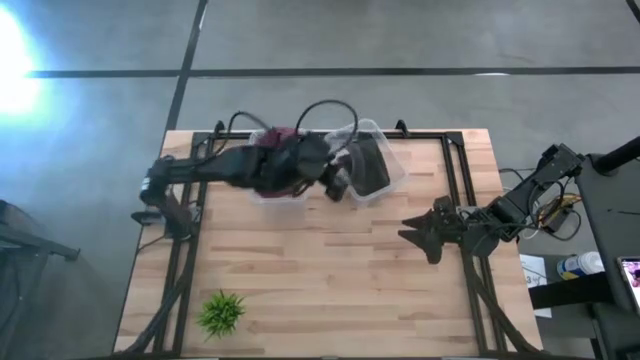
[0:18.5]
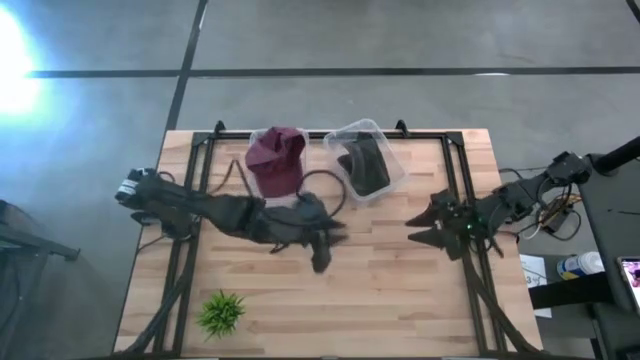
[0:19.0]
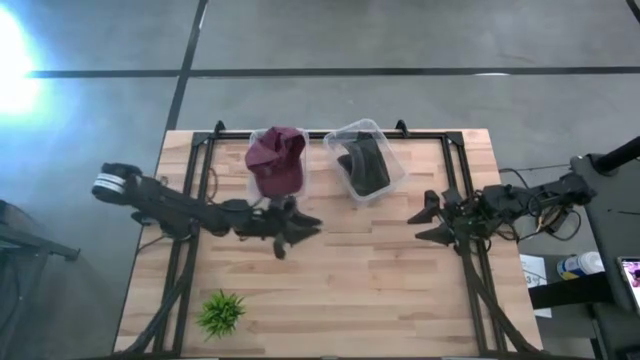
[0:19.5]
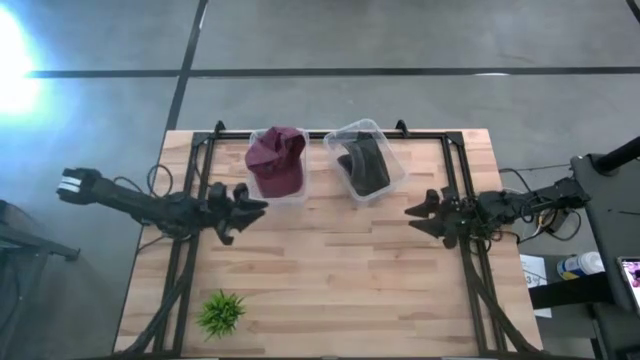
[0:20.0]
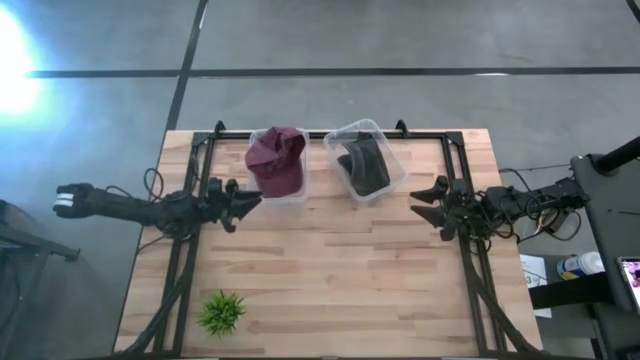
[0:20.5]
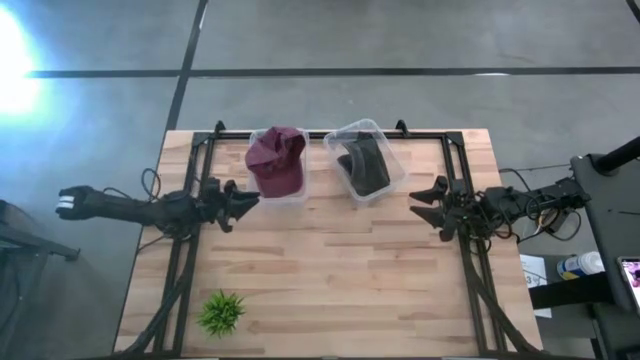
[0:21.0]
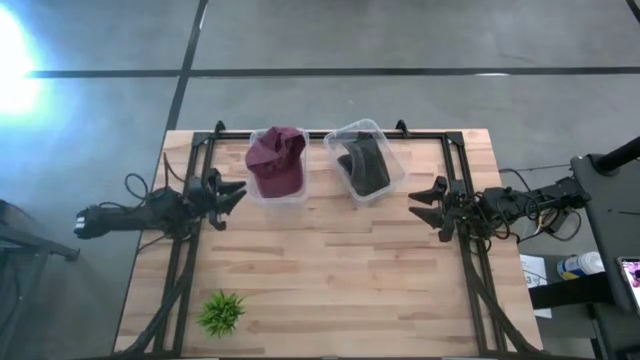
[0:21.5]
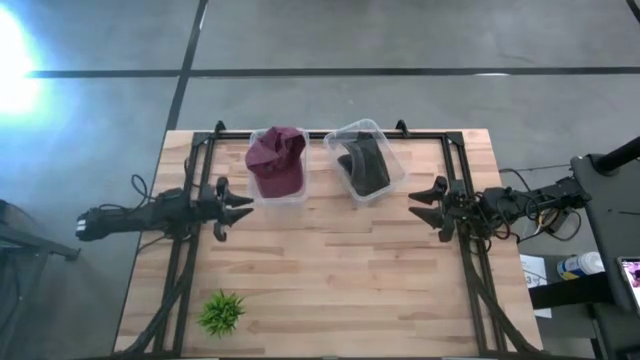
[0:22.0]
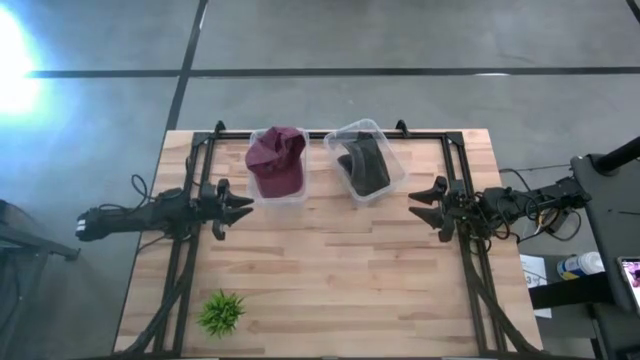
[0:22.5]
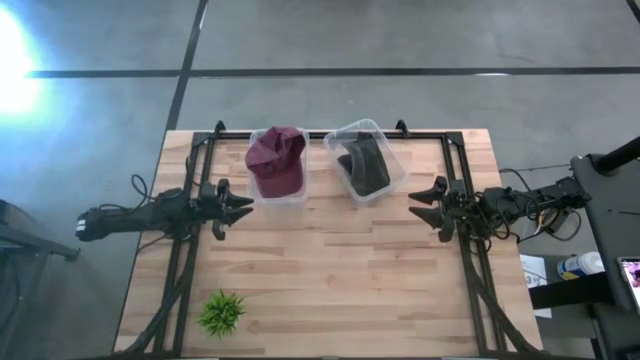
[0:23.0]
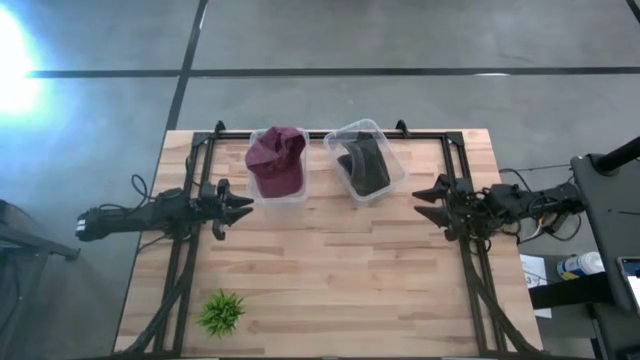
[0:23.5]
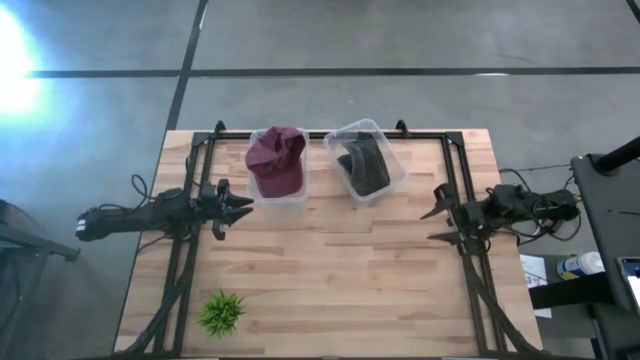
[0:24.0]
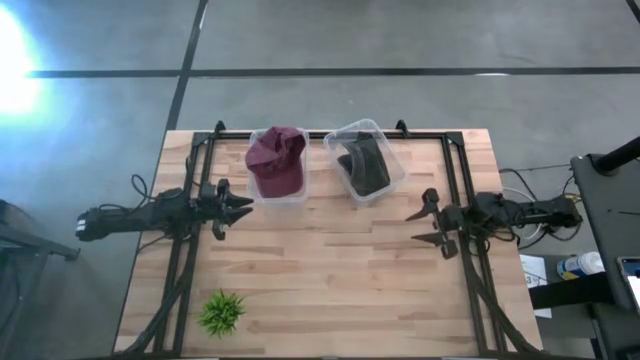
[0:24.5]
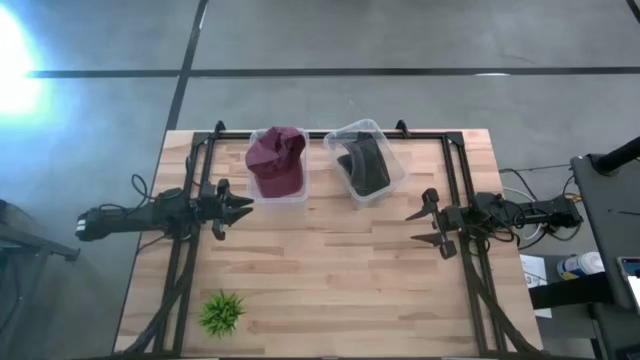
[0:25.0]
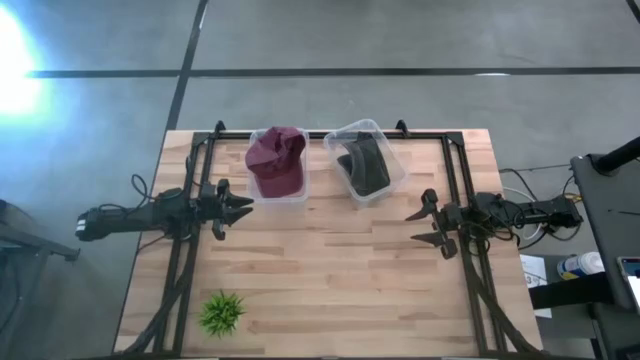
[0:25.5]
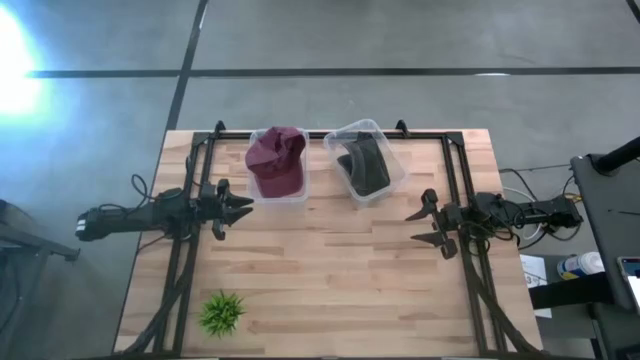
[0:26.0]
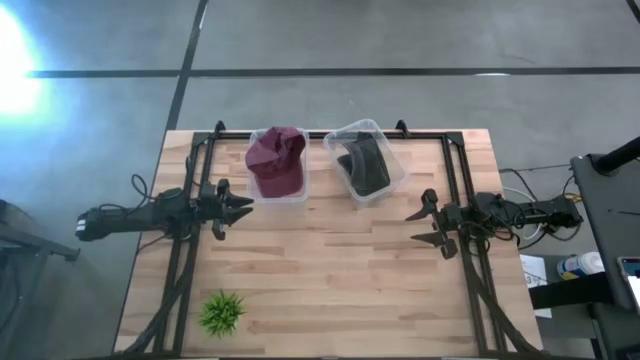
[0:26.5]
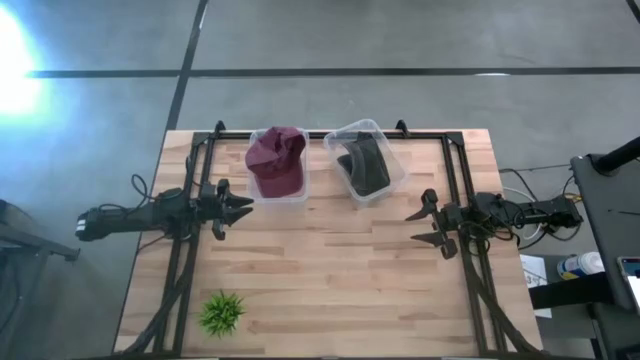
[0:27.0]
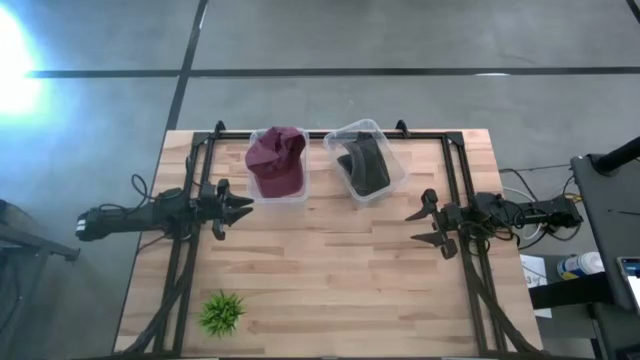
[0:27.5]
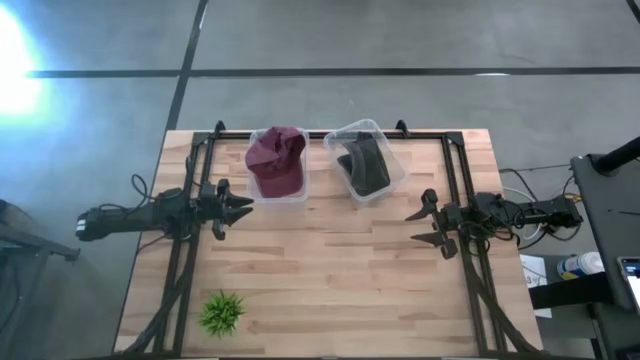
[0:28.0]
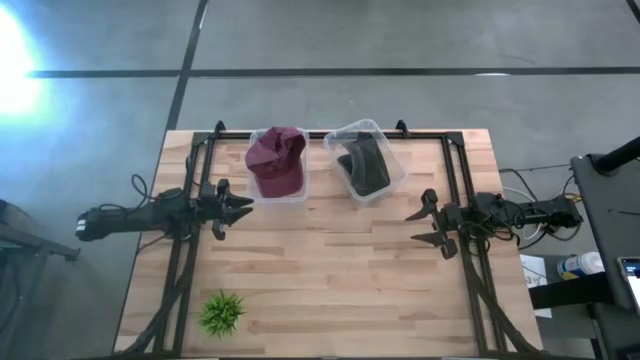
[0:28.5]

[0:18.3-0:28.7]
Task: Pick & Place hat
Return to Home Position

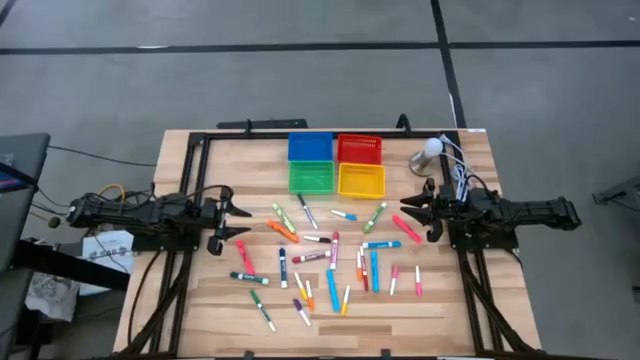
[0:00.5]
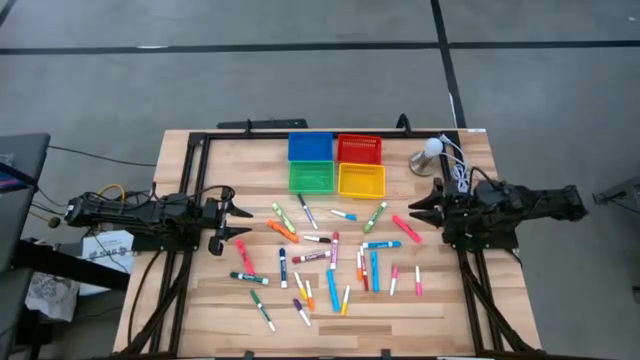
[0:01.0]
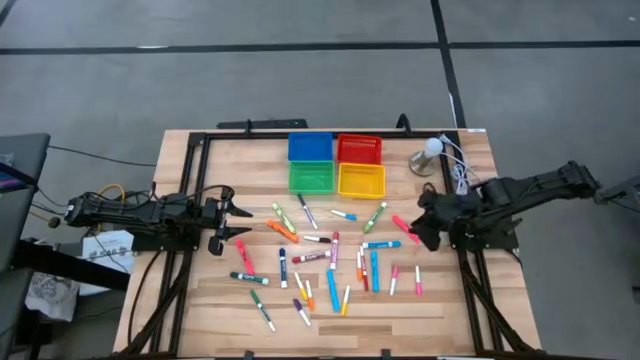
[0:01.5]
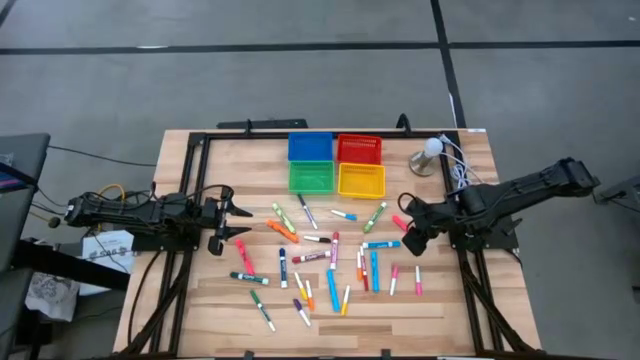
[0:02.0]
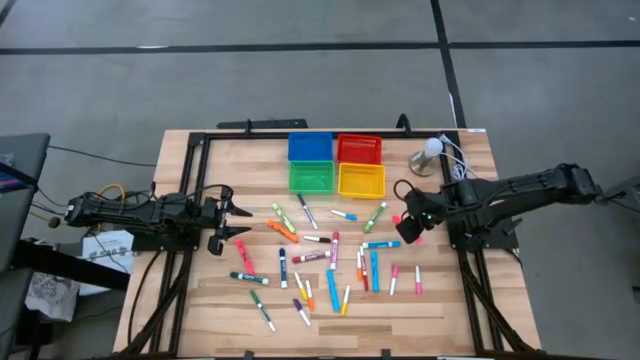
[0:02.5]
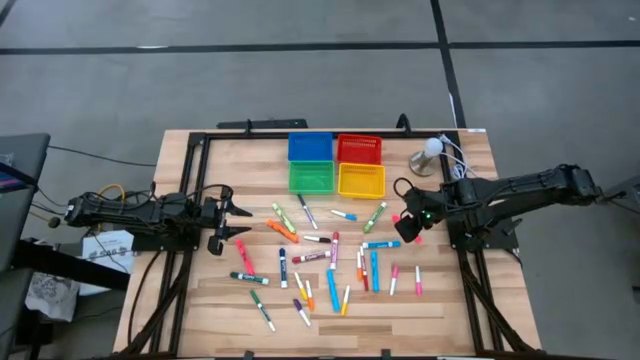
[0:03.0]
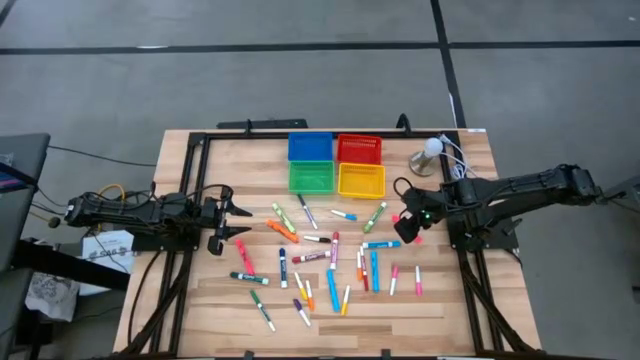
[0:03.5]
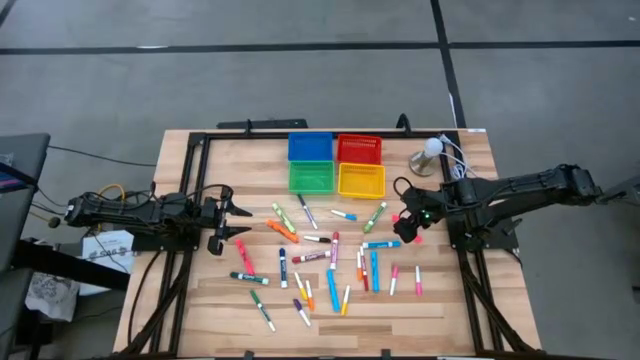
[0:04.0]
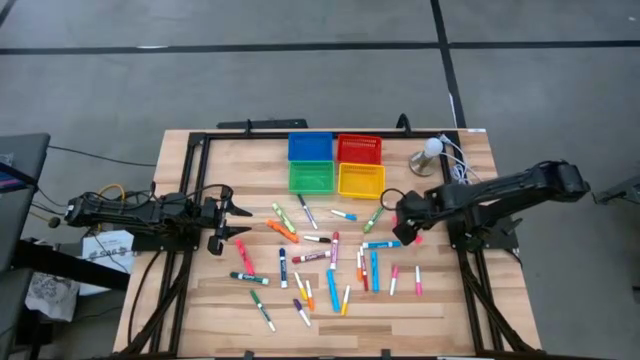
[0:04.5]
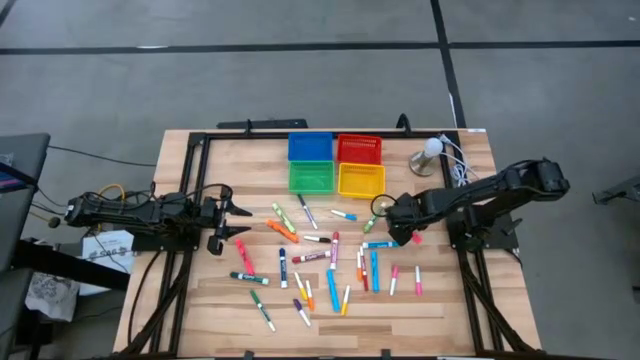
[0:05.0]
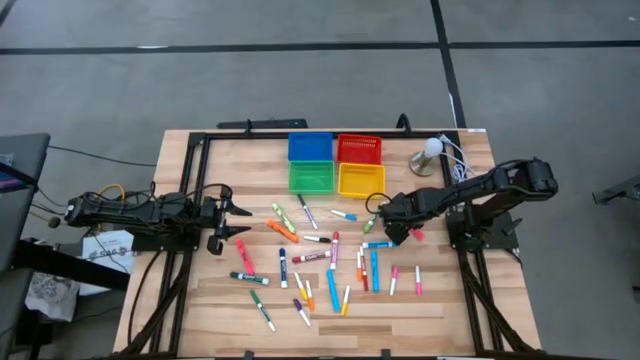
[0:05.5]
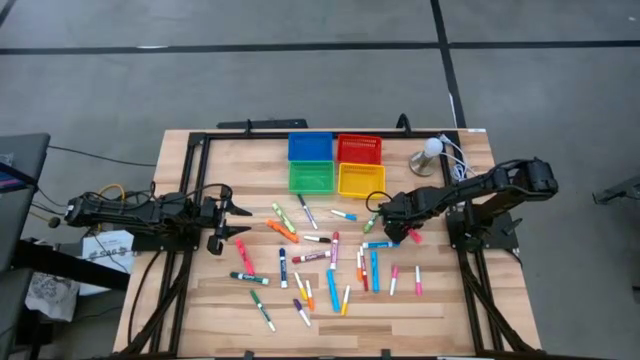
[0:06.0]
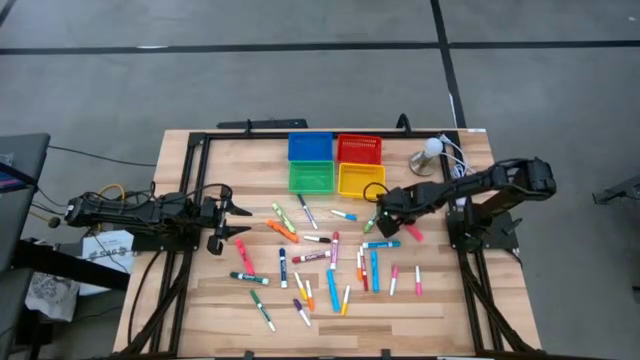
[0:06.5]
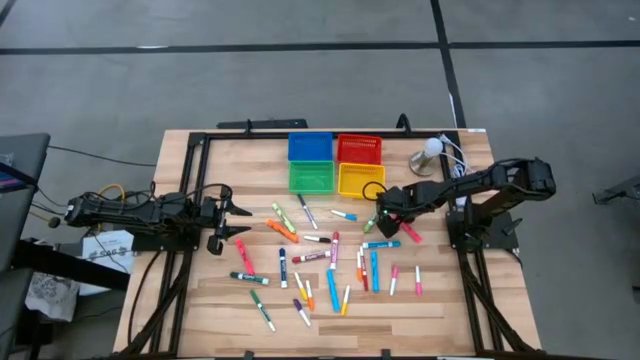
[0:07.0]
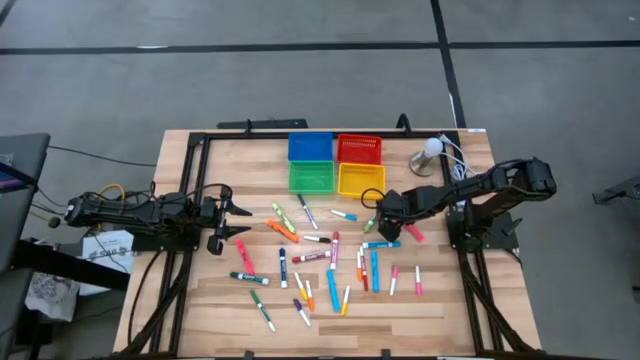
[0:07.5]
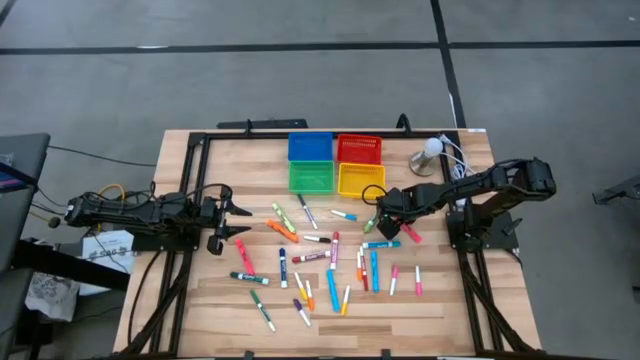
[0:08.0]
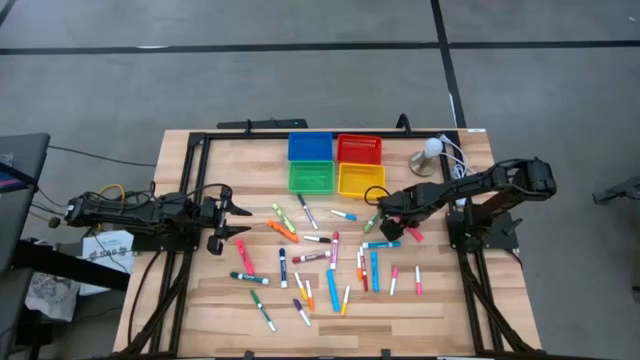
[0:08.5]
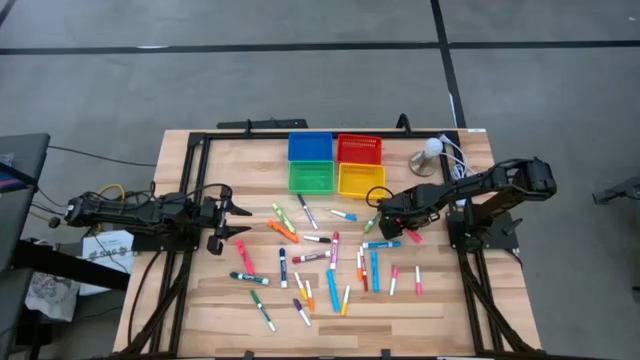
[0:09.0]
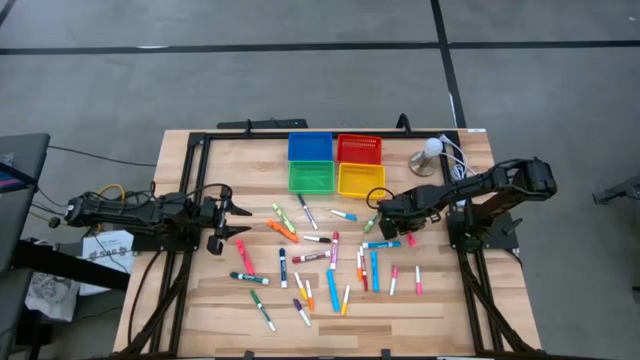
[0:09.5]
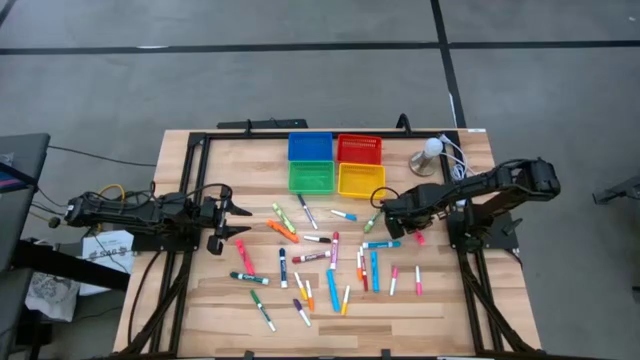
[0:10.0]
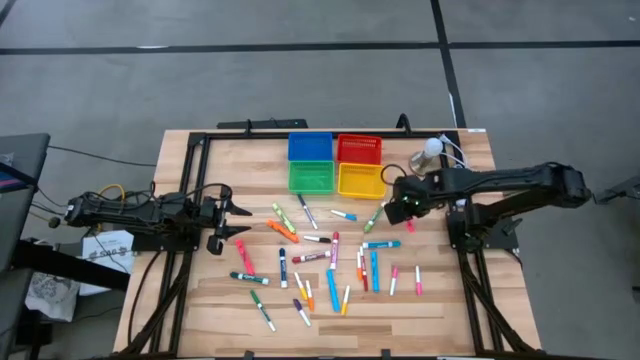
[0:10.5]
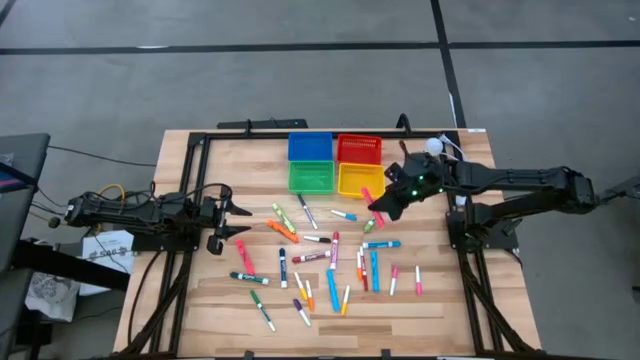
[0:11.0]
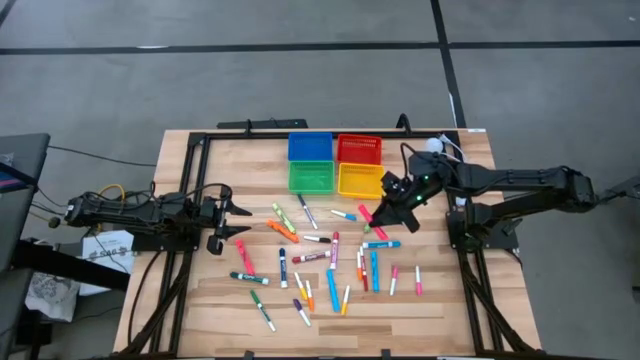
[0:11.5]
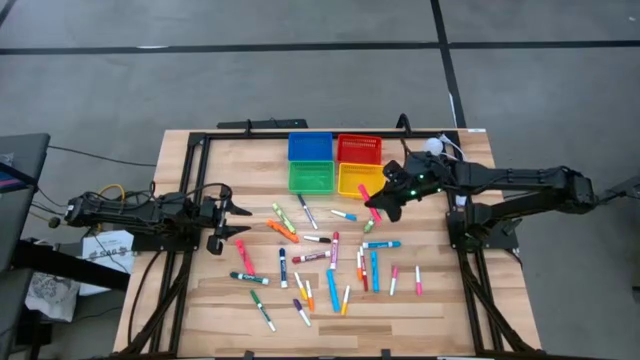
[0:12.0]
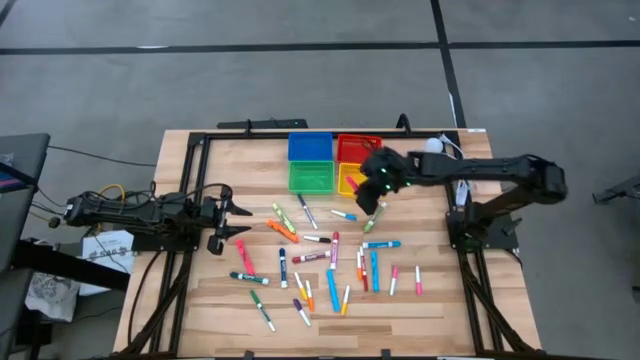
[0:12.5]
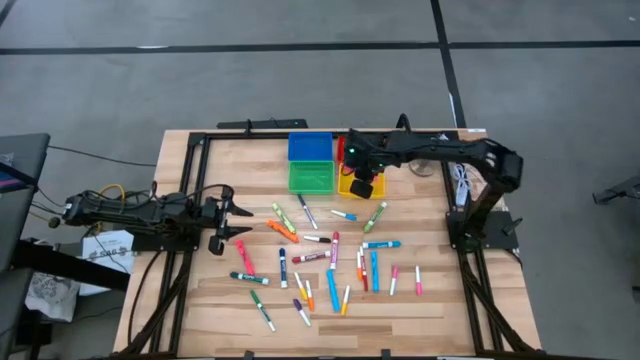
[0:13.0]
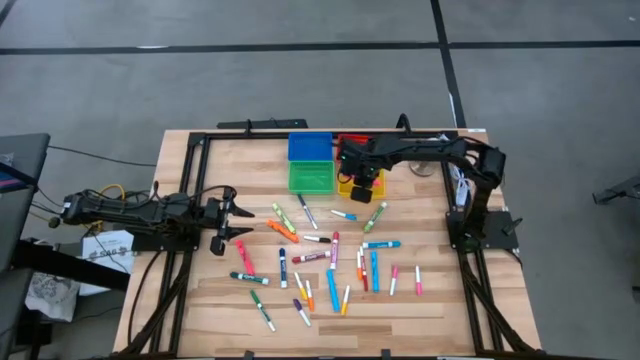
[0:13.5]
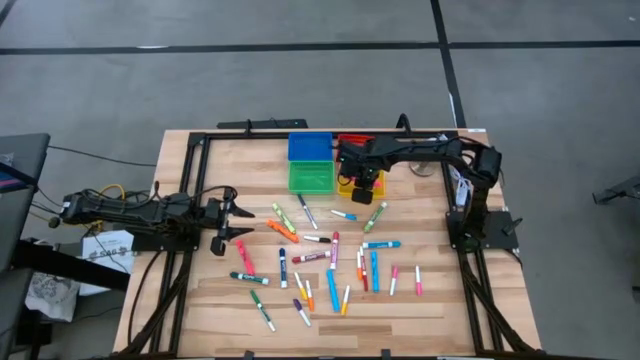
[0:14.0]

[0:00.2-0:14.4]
Task: Pick & Place Markers
Put the right large pink highlighter pen into the yellow bin
